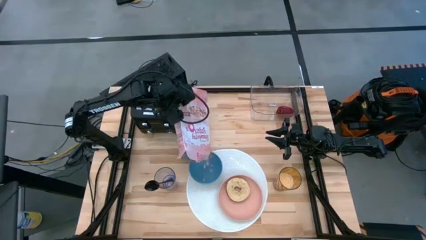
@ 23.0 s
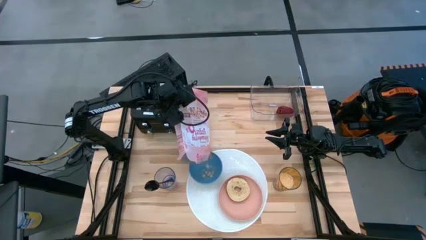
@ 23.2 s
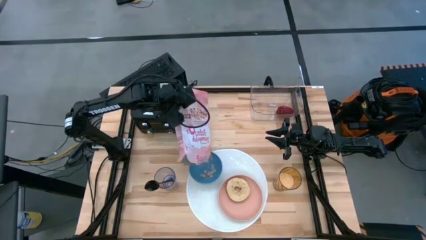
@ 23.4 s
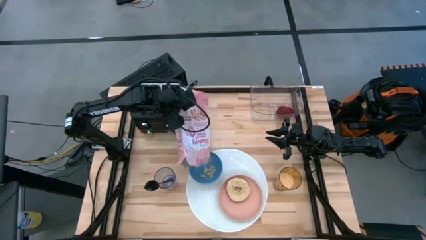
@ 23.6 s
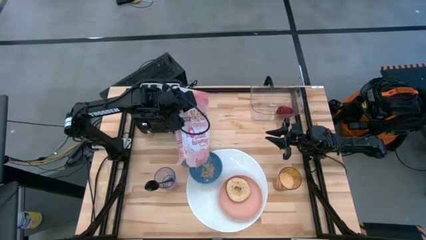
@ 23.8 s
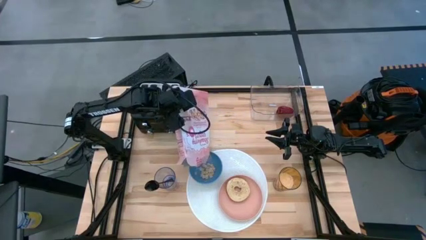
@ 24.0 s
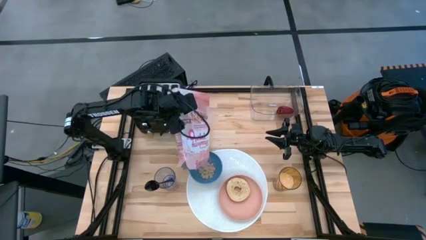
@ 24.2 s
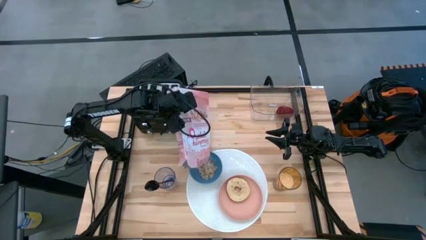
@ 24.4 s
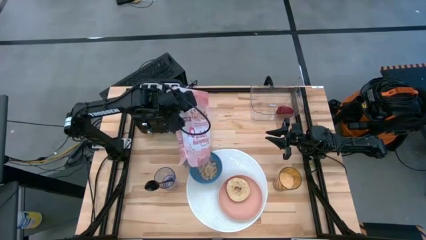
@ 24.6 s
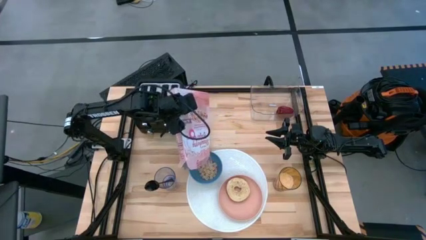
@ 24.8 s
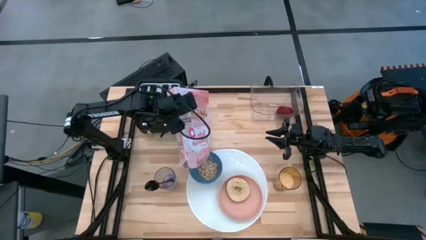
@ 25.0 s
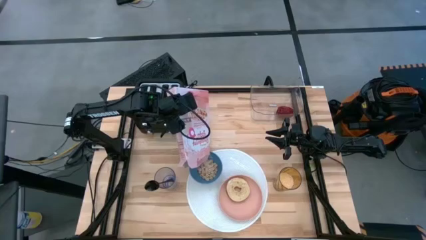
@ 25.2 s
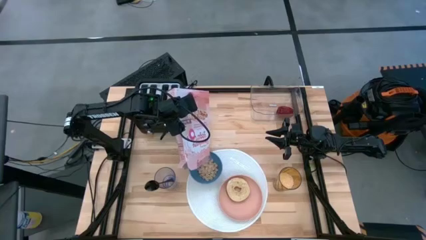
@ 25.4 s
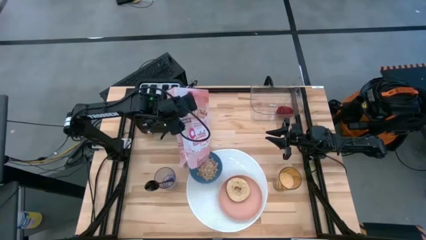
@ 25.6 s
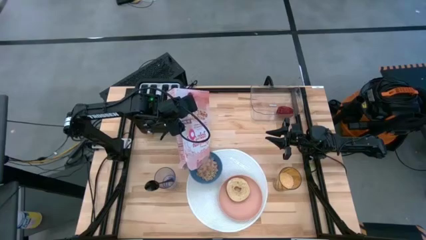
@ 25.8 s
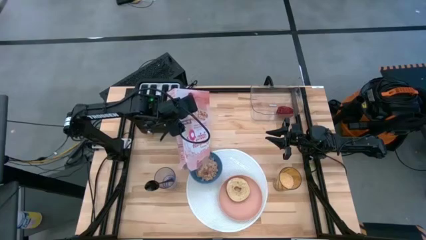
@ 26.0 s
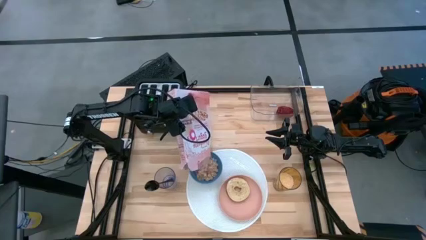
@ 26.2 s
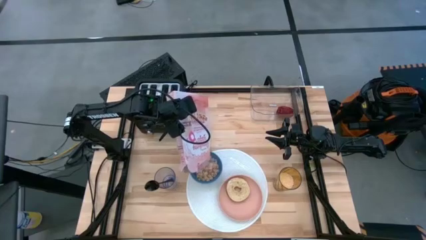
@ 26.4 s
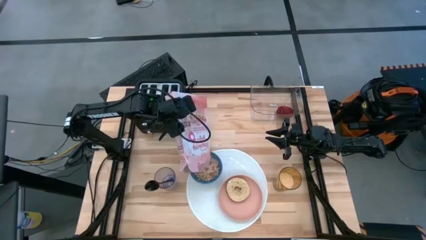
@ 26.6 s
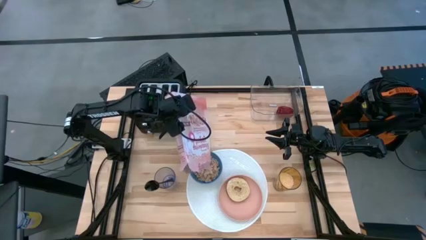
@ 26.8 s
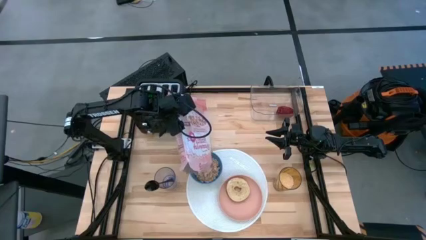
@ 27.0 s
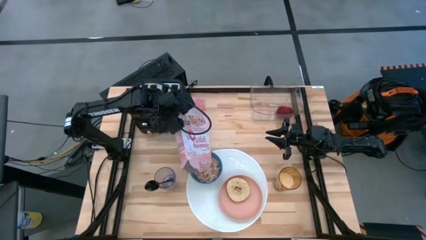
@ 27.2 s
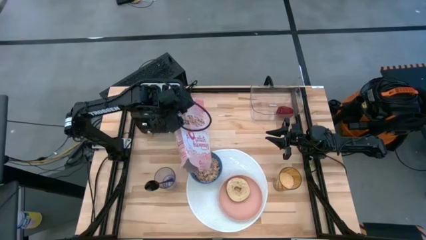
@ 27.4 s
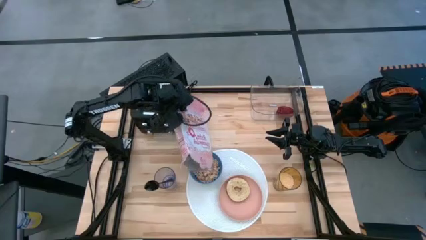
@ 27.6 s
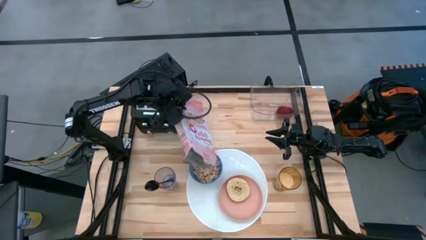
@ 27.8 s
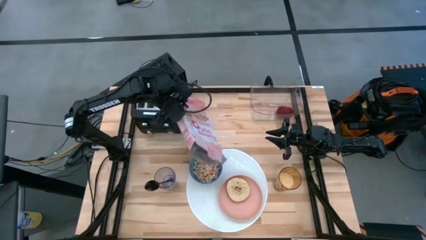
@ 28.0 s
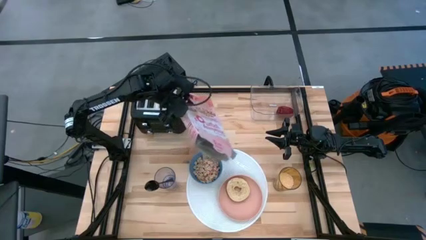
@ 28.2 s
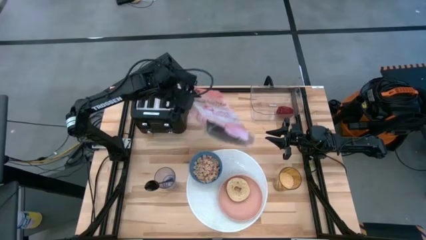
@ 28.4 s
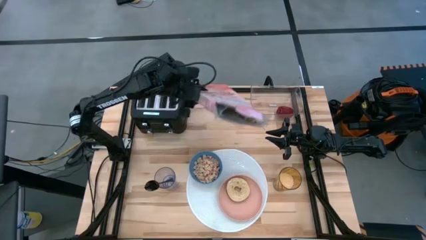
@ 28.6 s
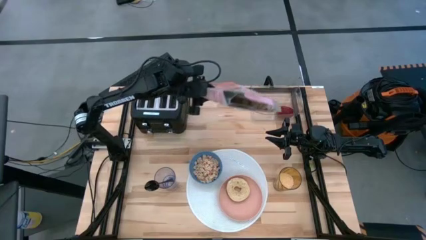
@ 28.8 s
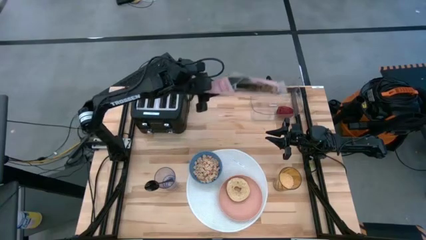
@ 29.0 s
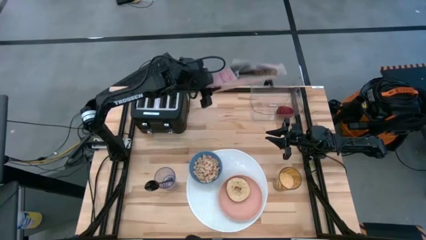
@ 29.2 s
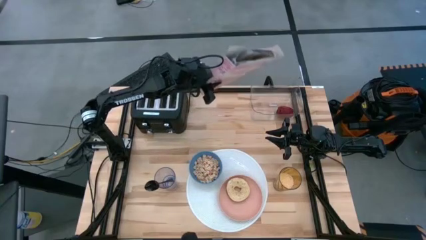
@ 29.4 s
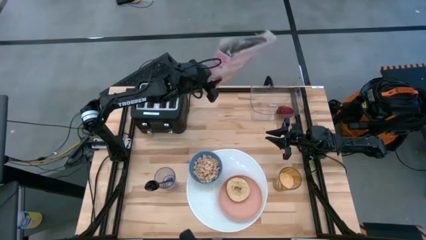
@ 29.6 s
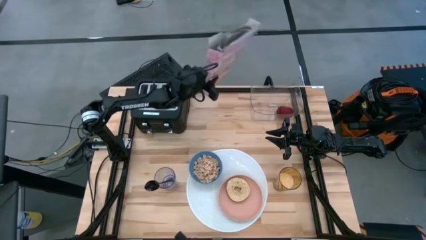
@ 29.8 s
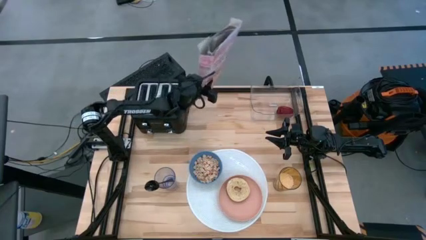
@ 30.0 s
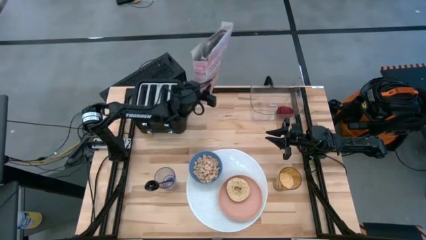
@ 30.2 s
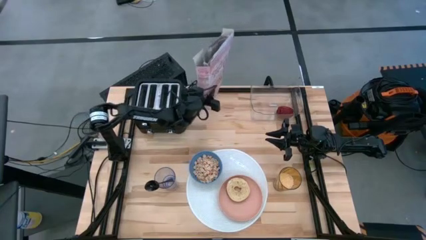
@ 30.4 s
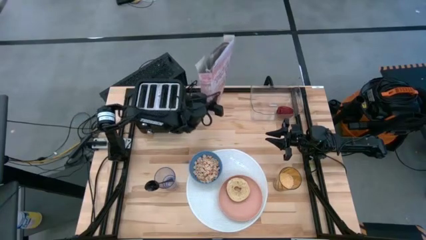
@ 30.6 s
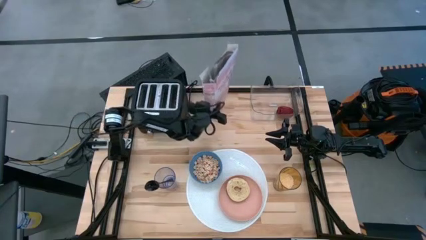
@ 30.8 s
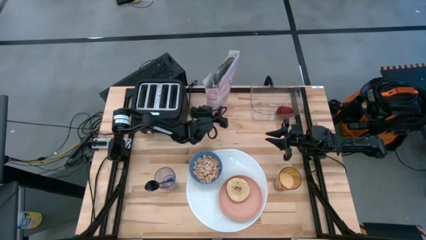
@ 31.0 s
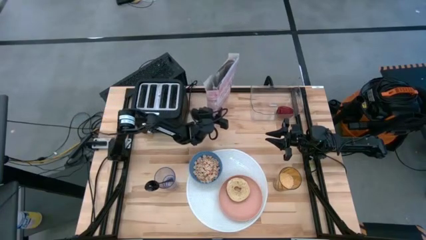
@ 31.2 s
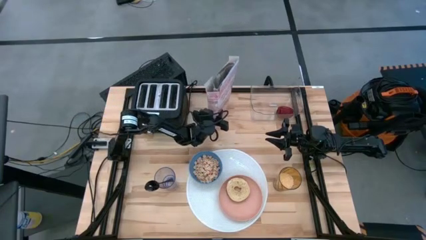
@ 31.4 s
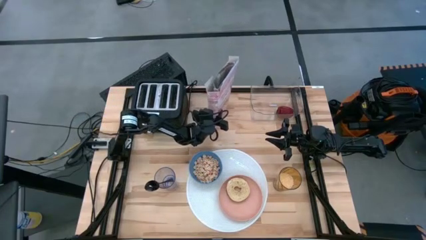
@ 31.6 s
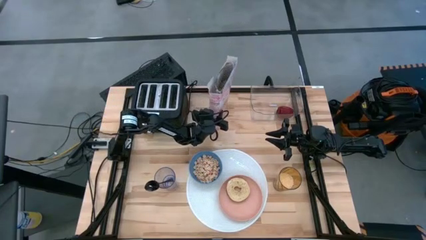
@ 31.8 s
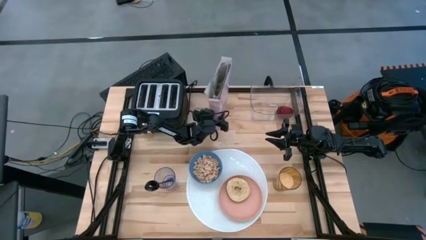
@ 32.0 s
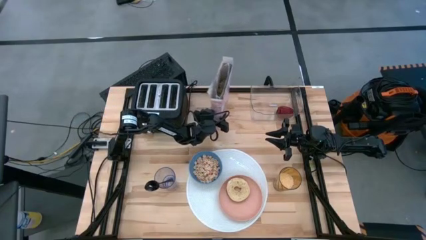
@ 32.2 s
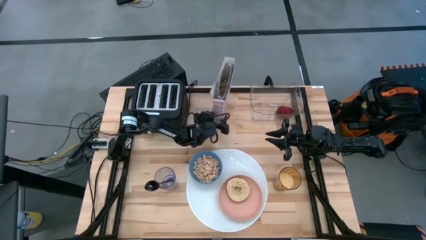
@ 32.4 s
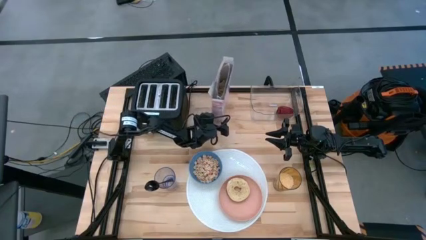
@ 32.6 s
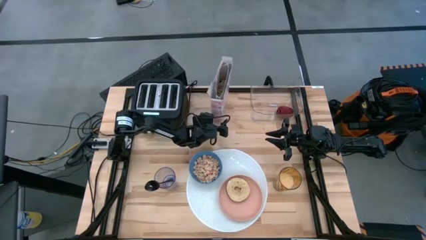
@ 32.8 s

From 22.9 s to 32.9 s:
Task: Arrange a breakfast setting
Pour the cereal from the cereal box into the blue bowl
